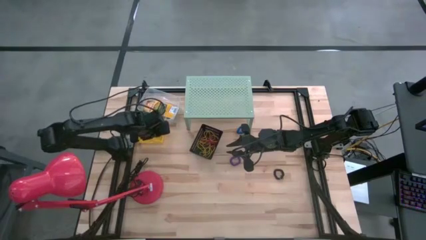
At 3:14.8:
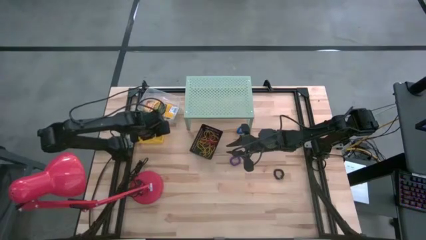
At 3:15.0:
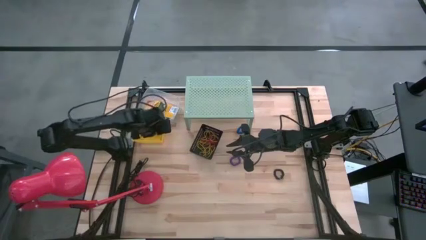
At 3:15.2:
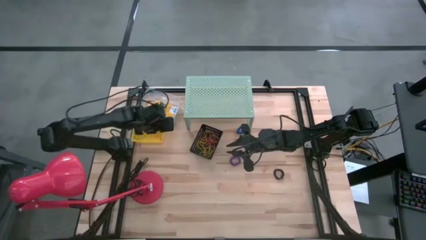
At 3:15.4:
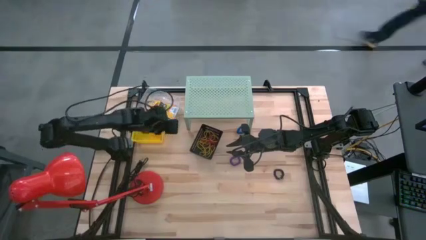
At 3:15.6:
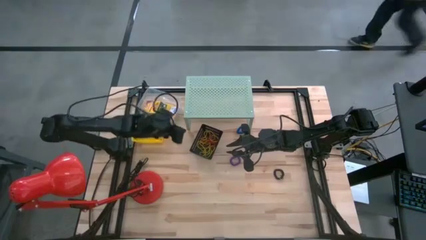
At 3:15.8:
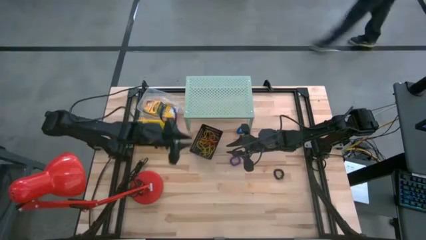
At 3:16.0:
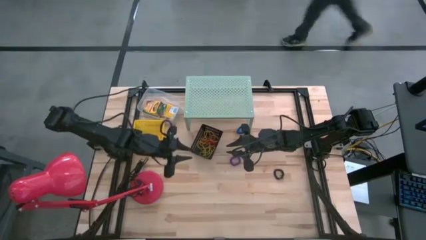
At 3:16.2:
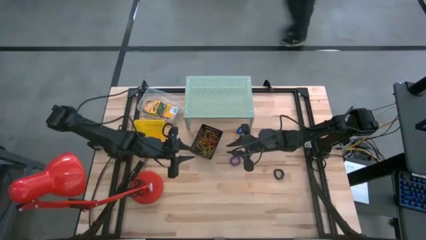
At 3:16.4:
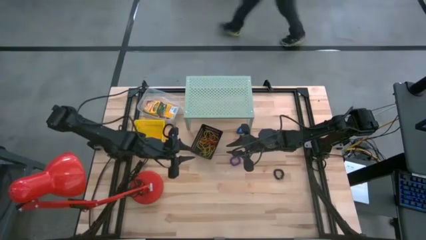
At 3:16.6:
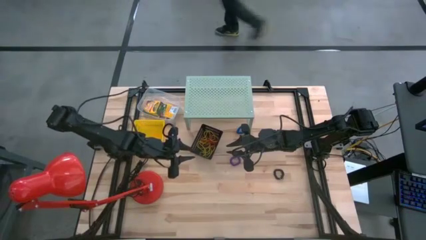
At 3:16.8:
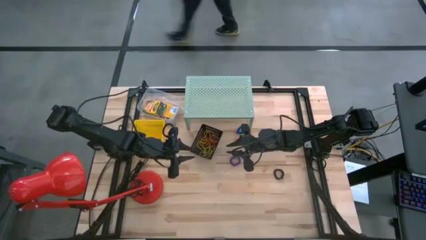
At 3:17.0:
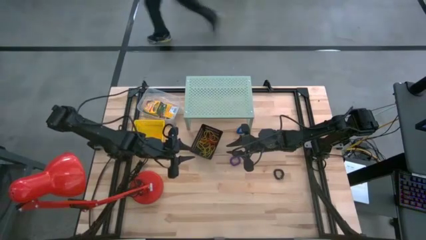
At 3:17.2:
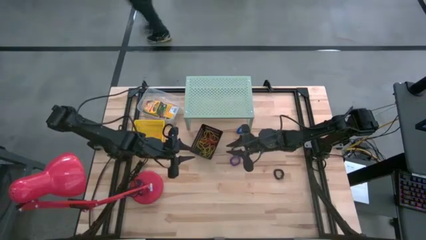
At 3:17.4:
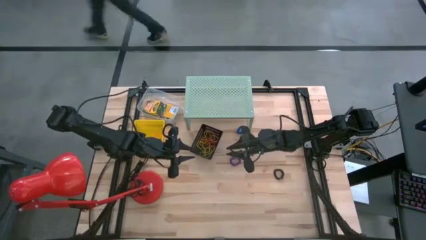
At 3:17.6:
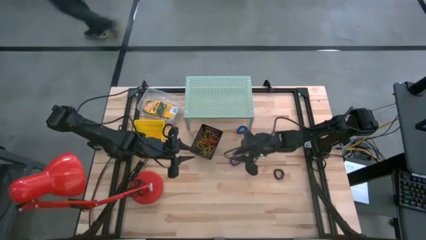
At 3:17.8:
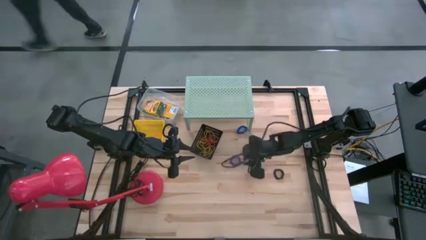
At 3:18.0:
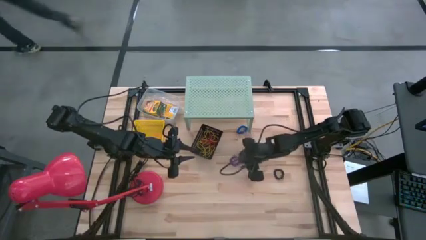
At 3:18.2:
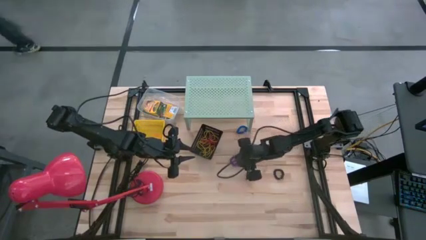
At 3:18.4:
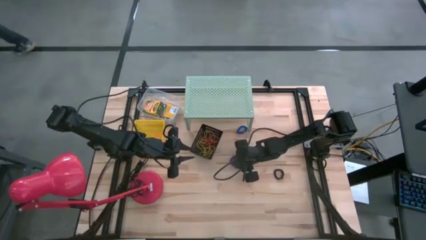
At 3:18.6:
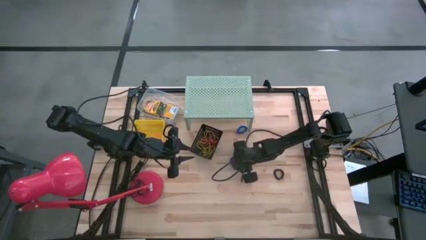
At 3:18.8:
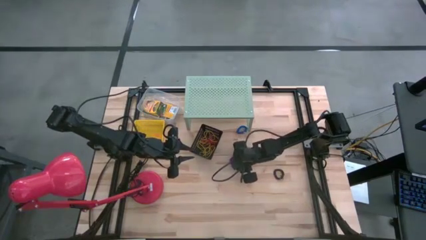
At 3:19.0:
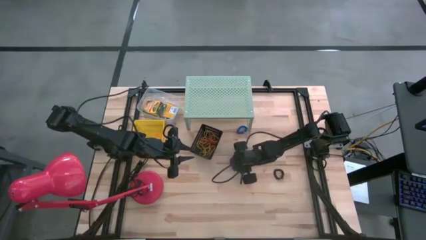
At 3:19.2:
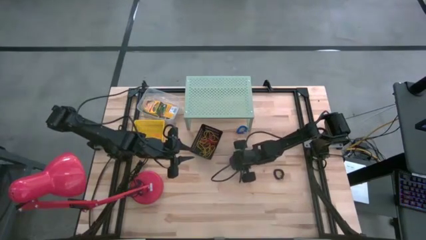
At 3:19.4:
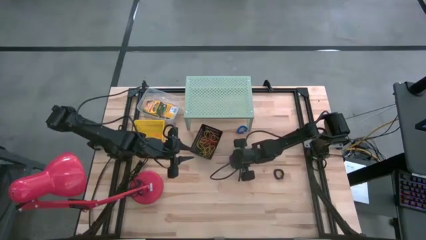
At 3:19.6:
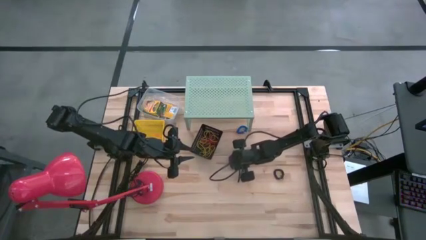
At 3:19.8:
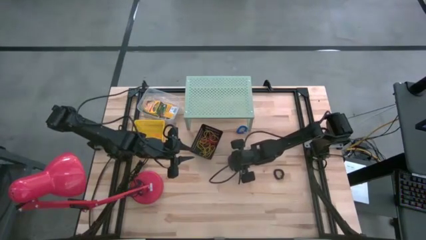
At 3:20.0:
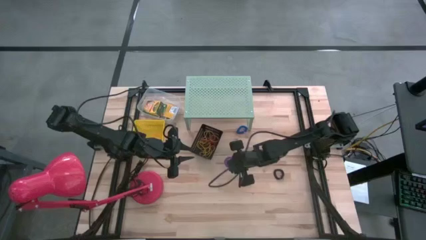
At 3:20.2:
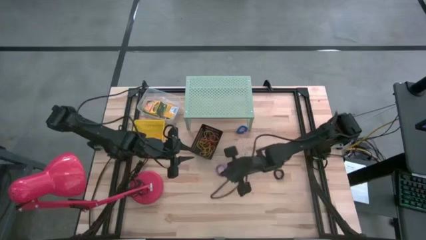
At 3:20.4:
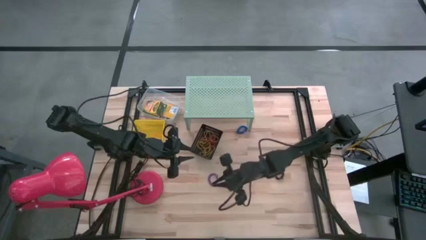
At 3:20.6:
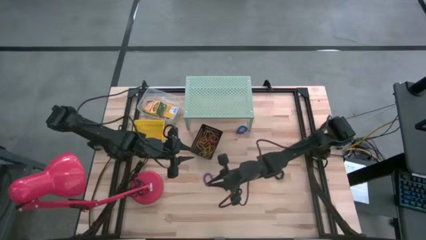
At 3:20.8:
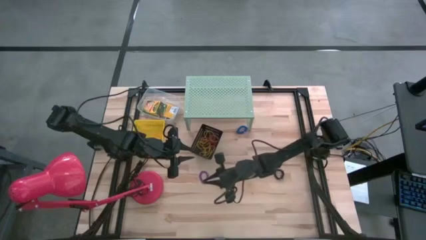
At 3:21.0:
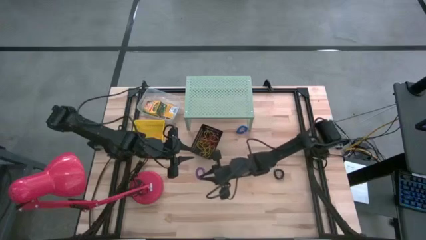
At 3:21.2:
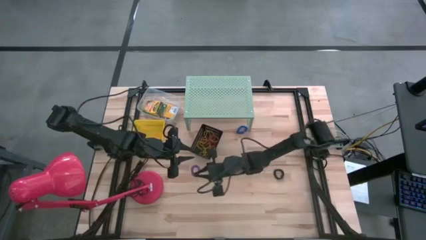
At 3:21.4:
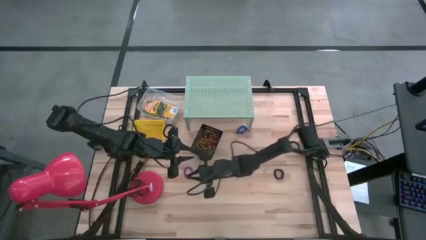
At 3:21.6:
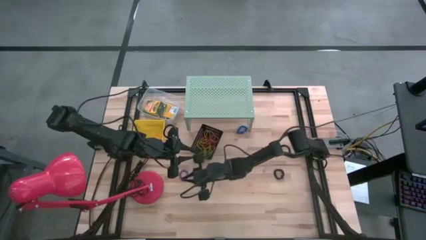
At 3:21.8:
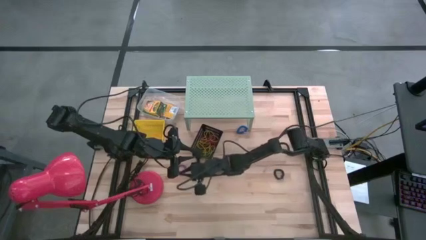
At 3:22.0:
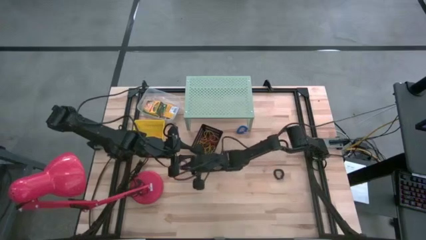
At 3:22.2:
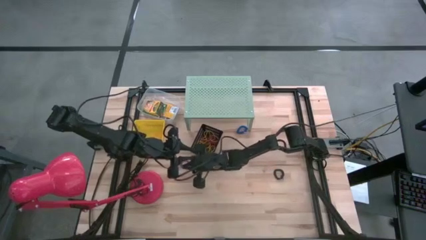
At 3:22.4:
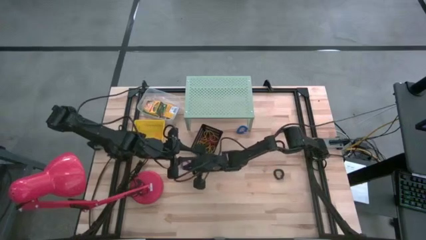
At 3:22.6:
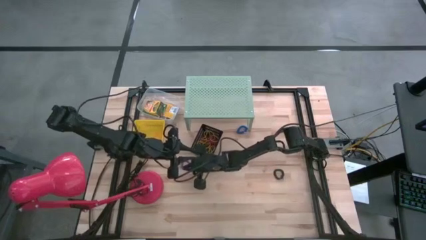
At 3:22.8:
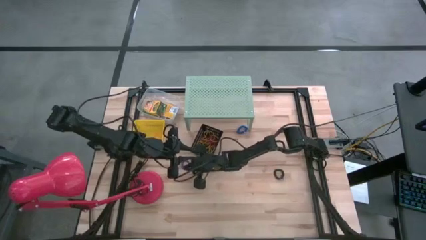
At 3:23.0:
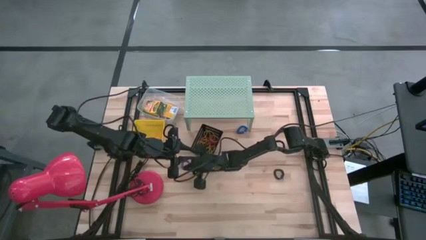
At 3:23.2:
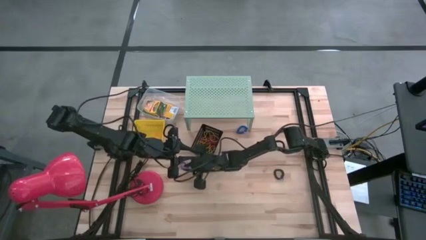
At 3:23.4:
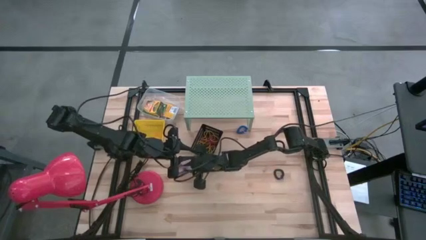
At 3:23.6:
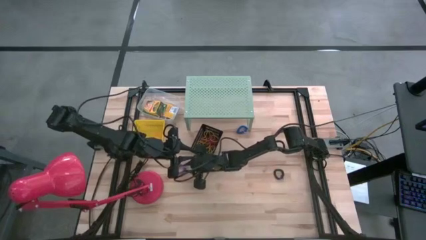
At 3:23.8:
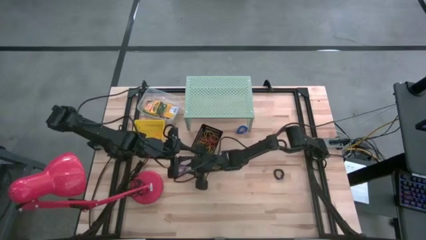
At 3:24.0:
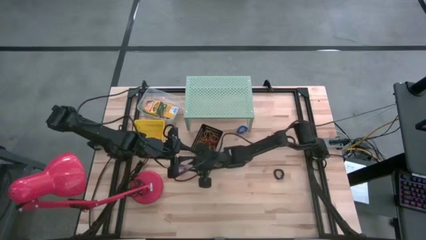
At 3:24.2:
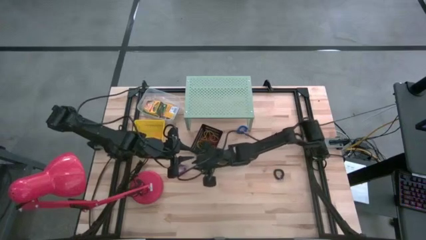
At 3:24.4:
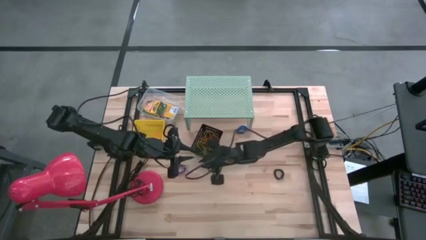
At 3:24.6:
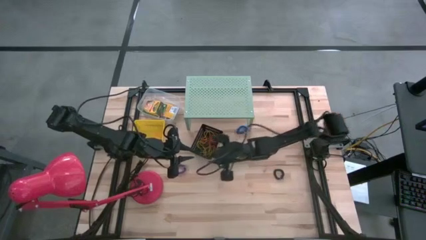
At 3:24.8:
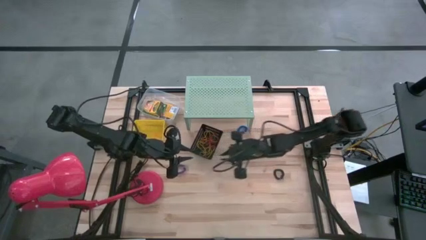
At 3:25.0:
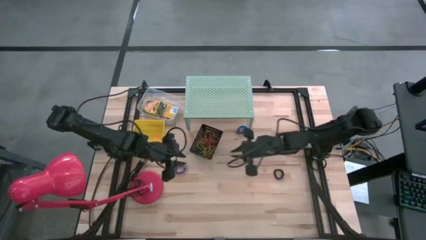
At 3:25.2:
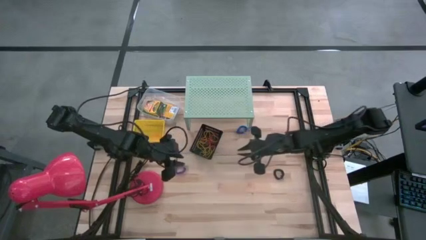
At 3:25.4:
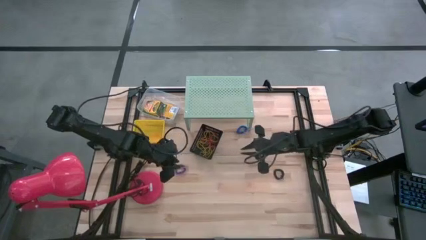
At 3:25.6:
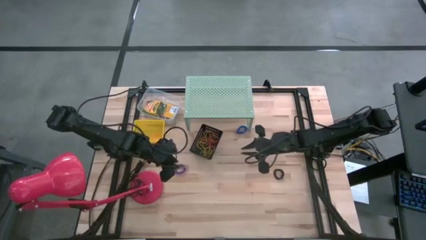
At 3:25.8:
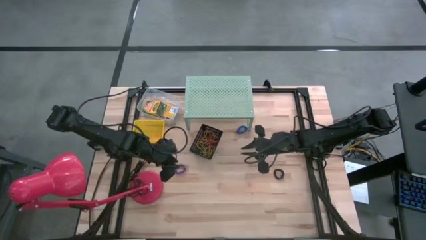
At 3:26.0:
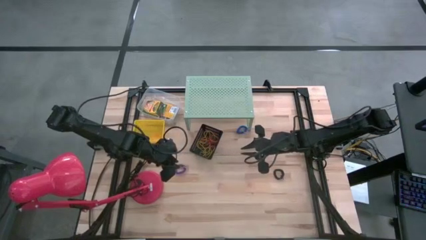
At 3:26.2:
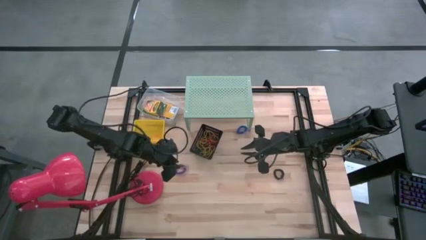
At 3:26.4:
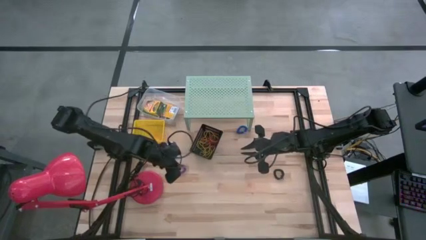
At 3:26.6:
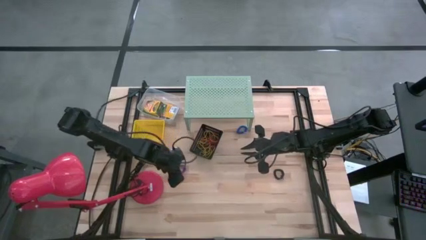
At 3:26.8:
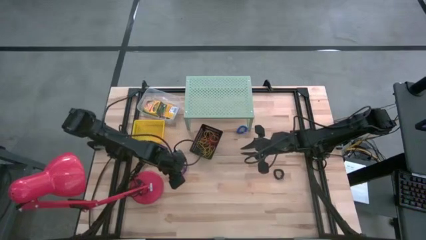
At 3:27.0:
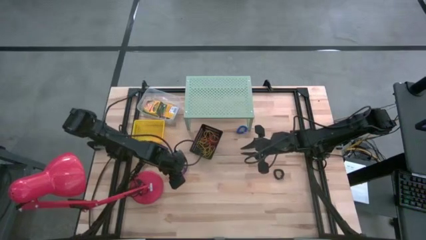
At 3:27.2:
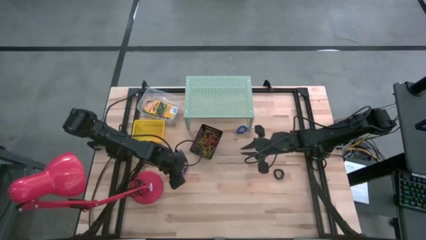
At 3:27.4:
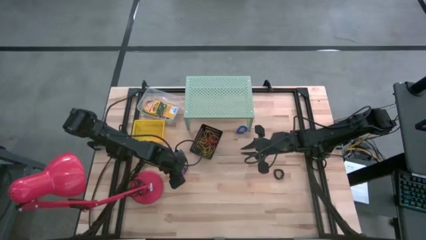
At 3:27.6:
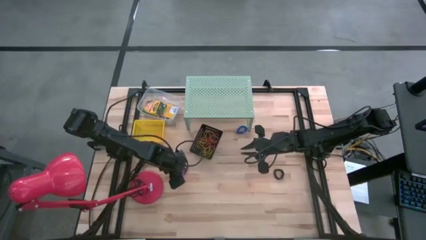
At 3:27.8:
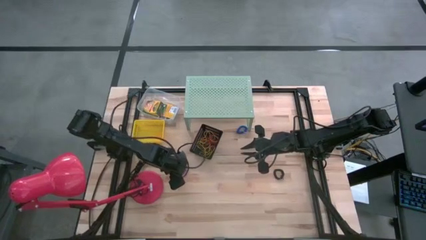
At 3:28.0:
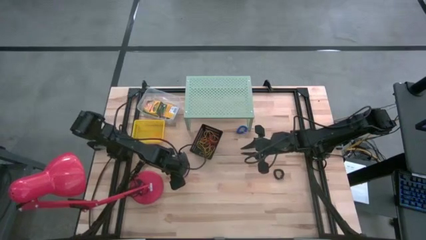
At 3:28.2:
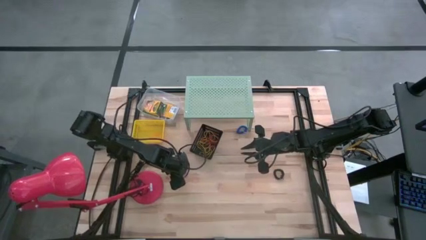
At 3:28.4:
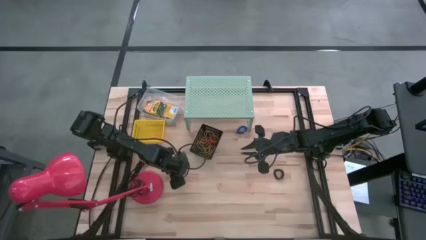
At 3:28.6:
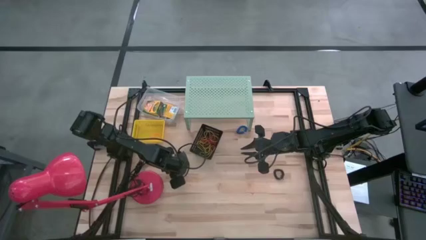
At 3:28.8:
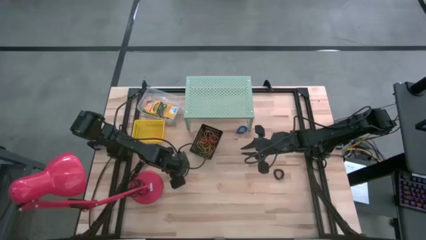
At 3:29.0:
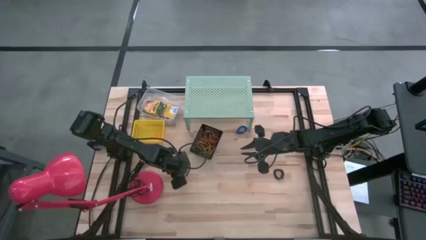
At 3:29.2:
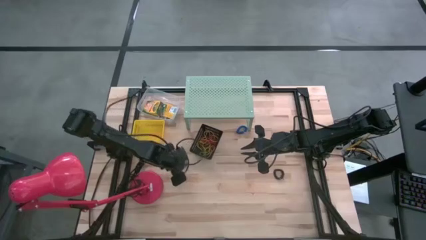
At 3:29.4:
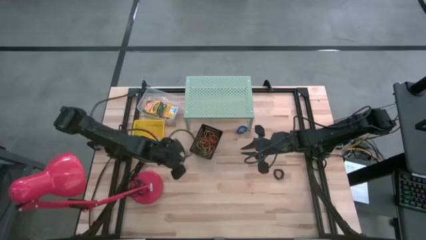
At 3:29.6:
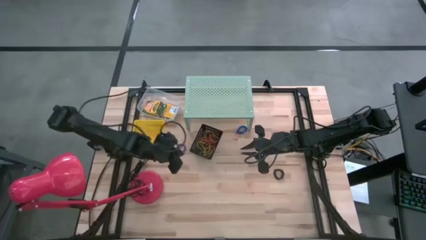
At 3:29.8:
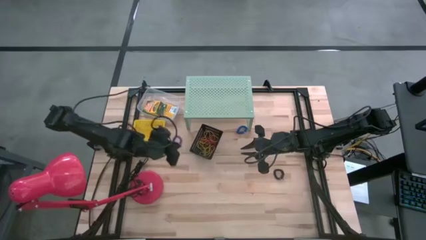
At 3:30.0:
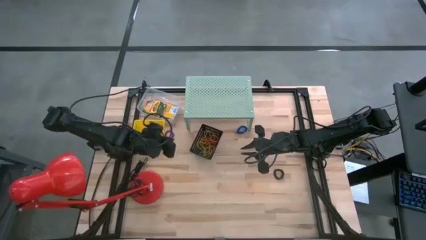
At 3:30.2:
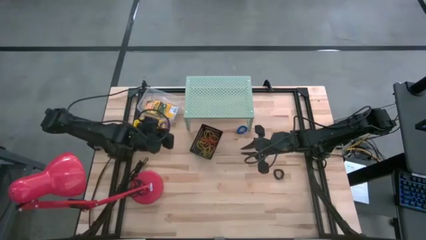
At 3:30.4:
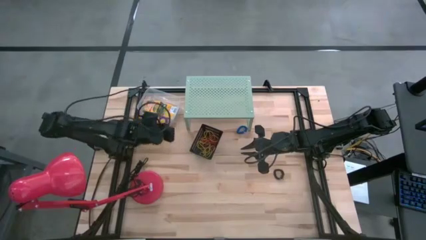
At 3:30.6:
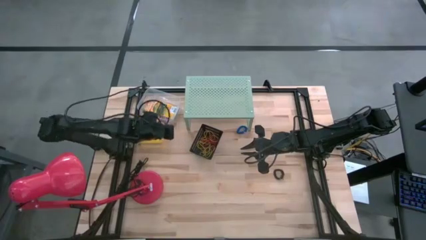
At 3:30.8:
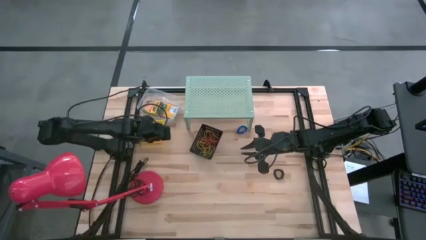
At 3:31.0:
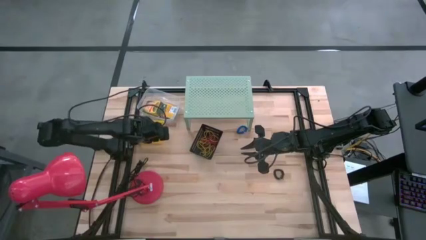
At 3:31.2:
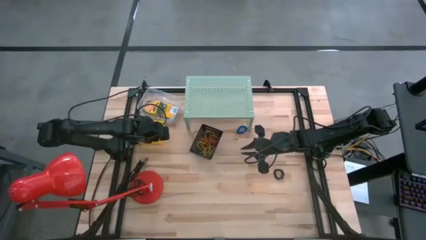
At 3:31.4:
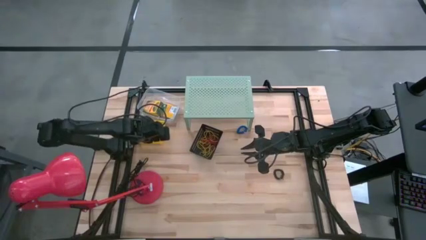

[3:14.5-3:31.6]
Task: Pick & Place Office Desk Supplies
Put the violet spring rubber band into the yellow bin
